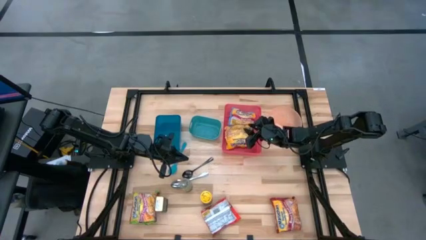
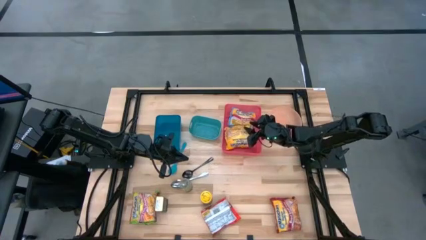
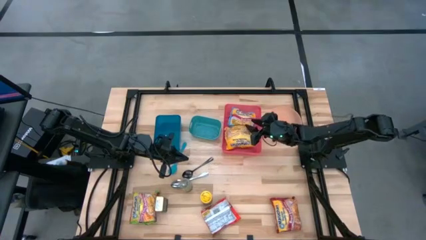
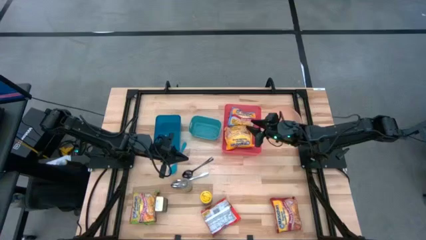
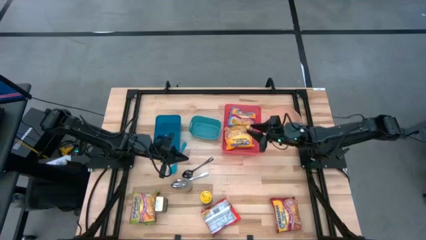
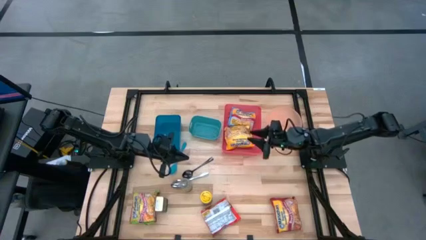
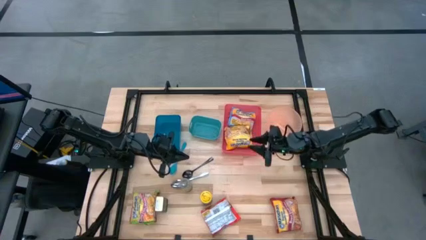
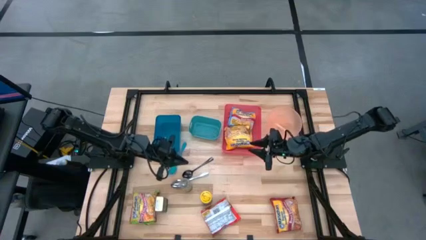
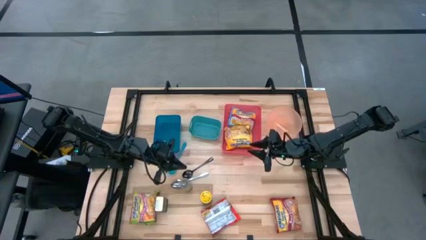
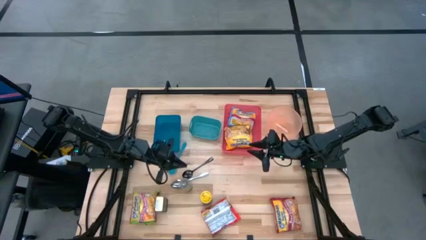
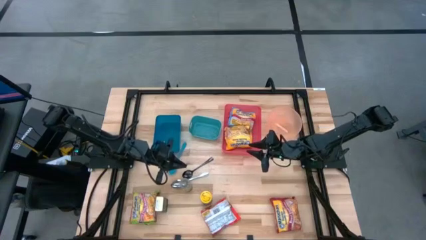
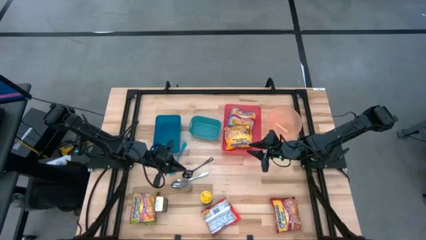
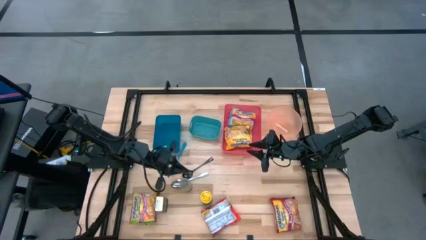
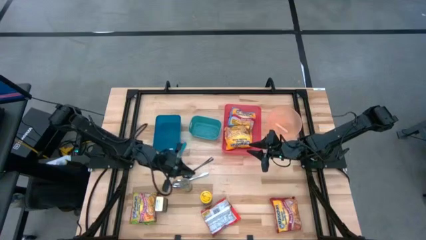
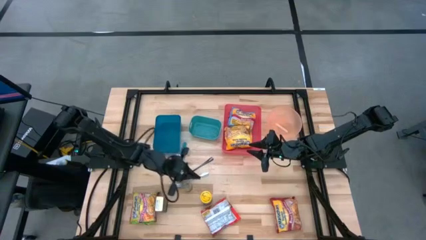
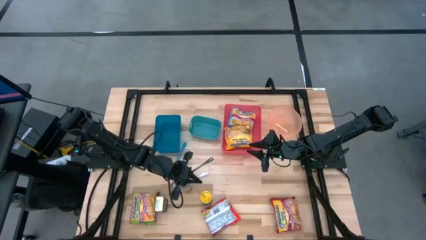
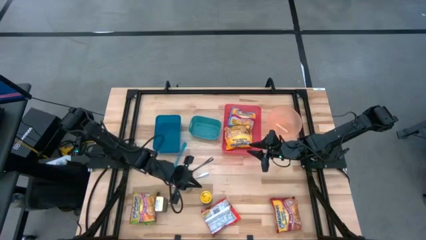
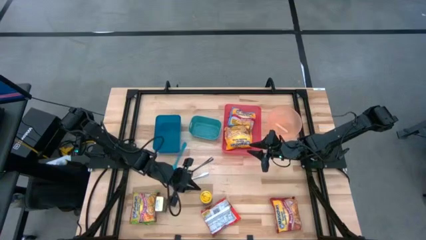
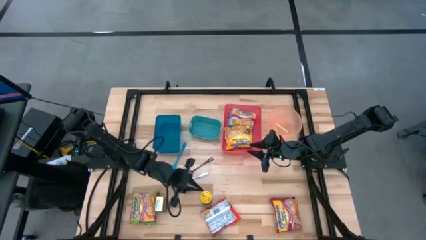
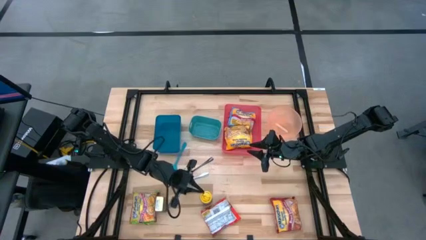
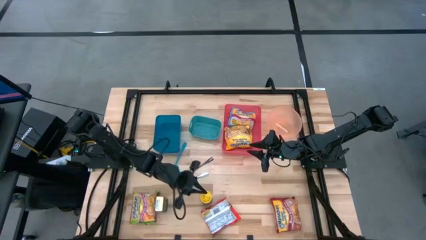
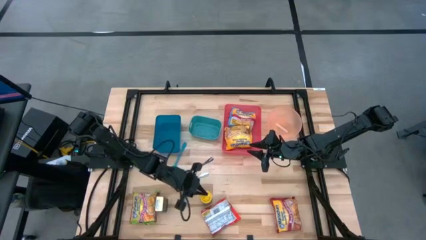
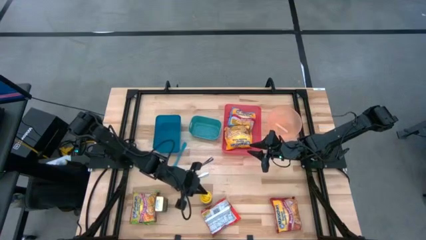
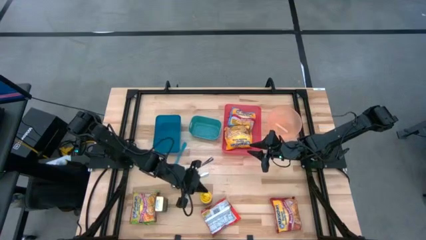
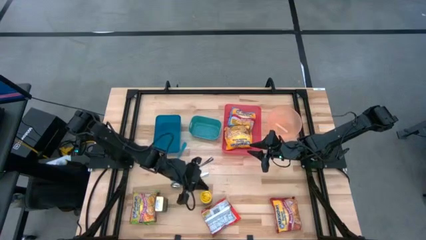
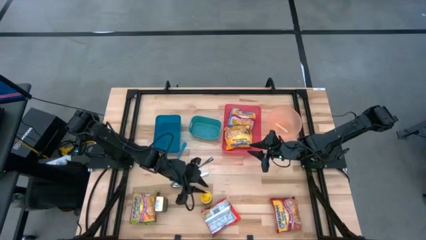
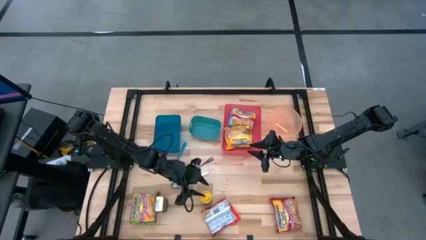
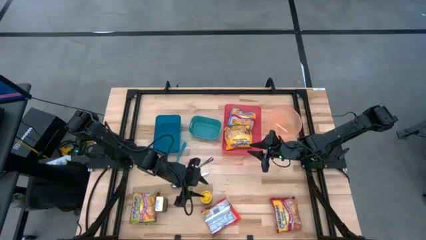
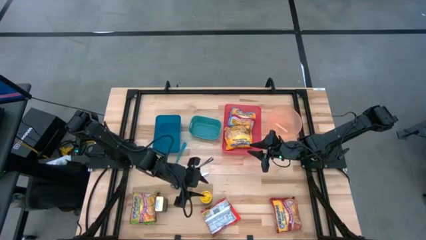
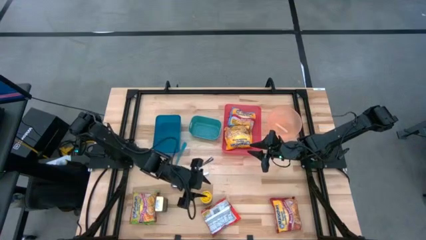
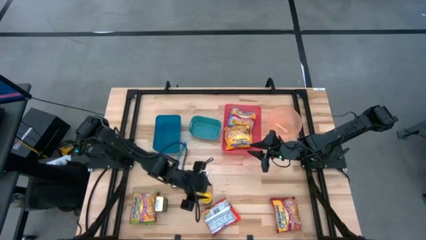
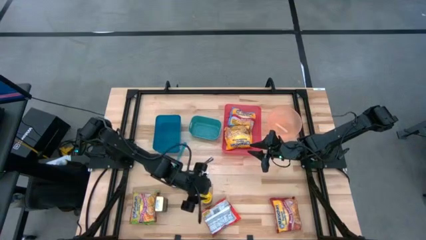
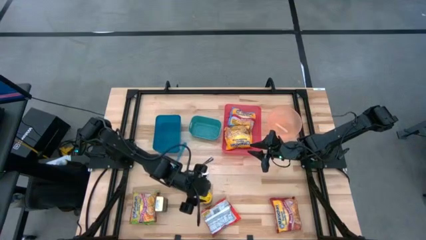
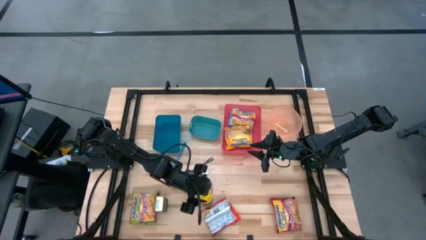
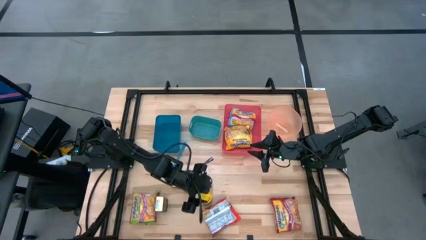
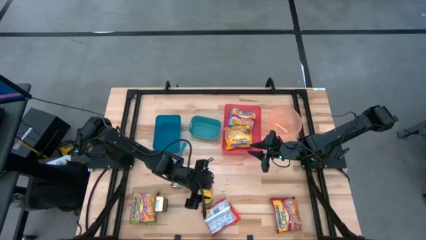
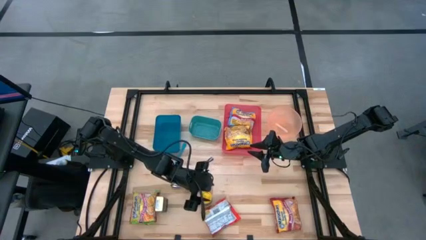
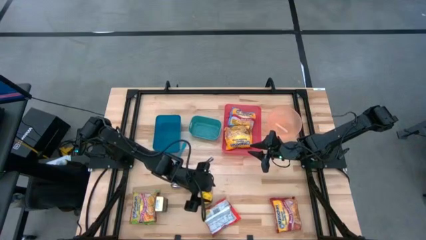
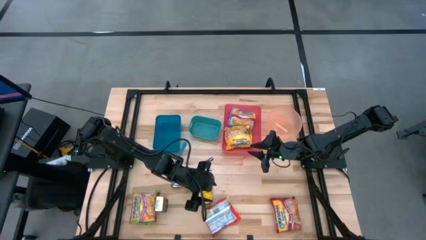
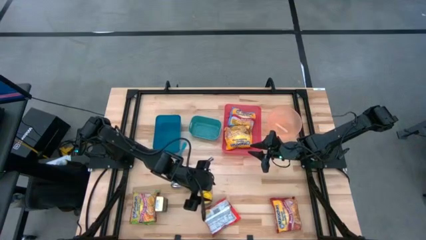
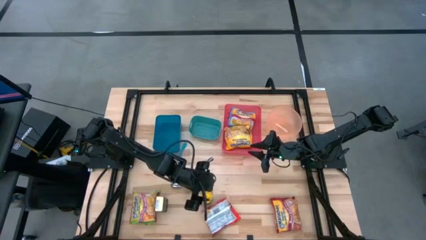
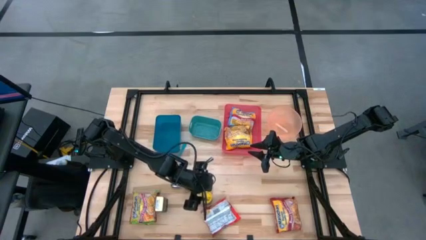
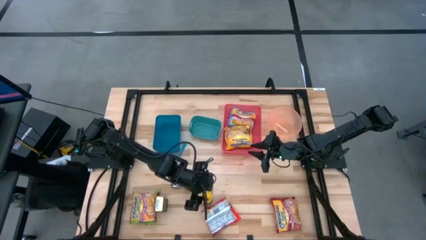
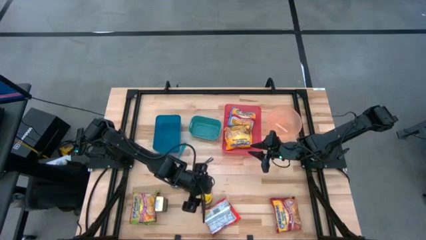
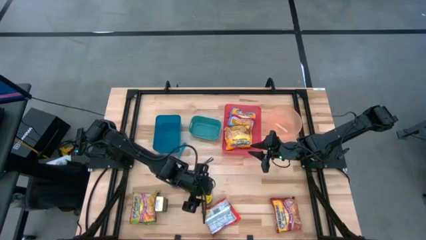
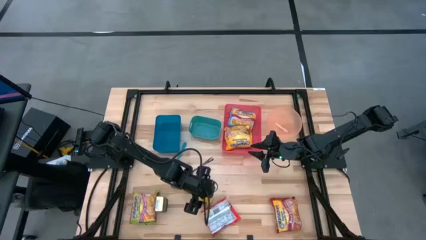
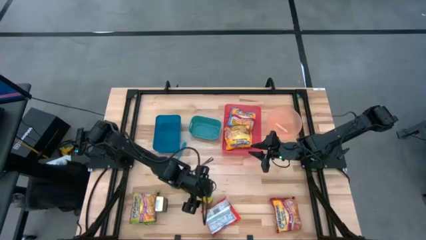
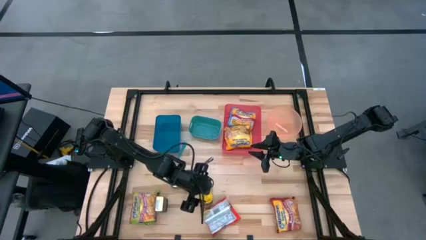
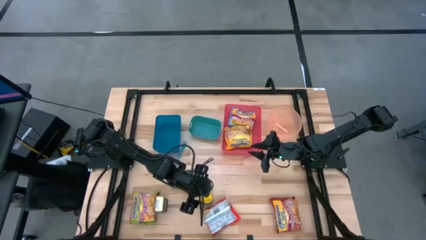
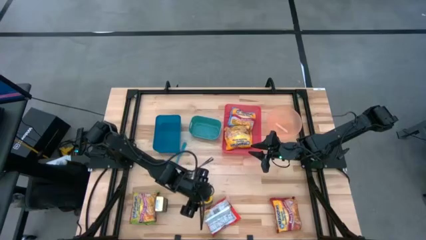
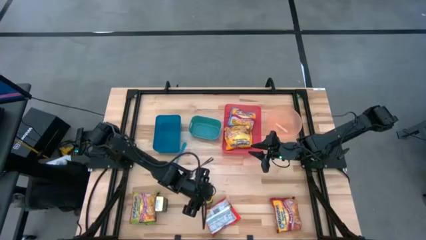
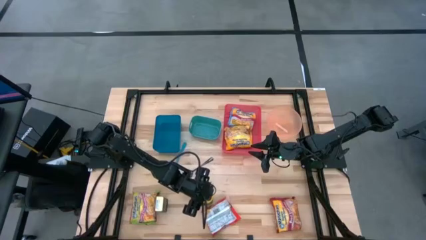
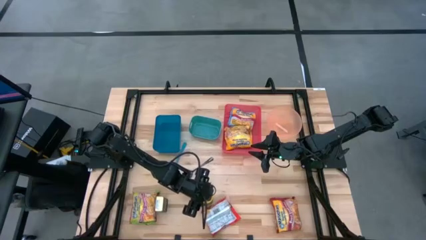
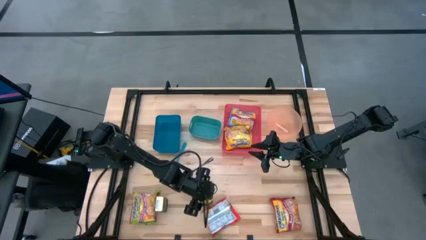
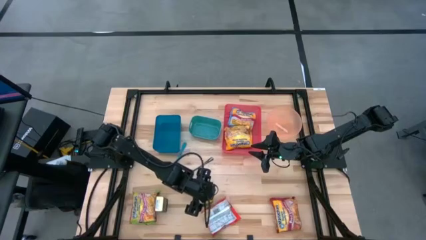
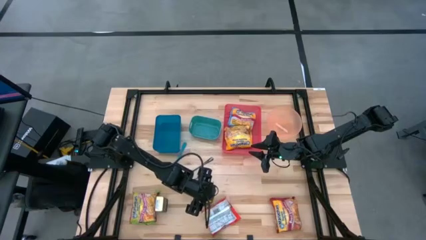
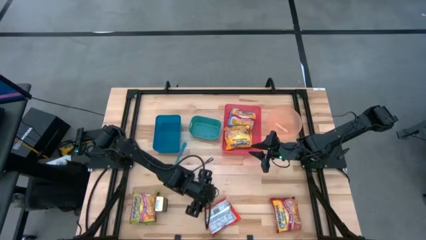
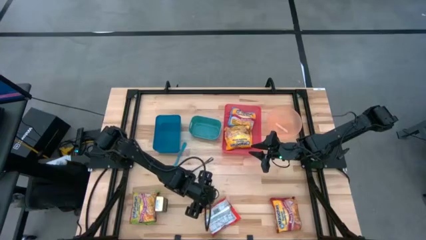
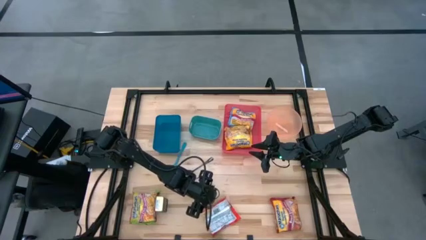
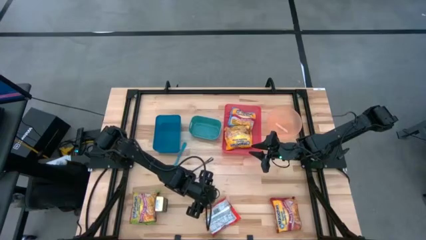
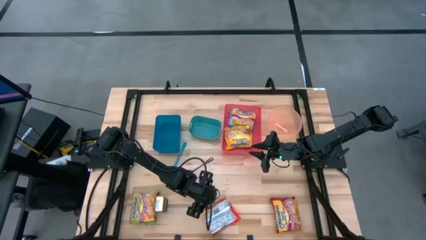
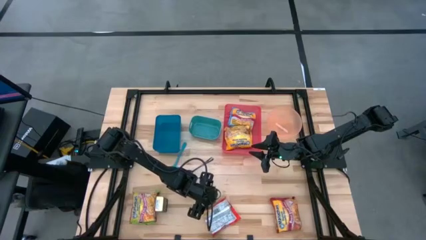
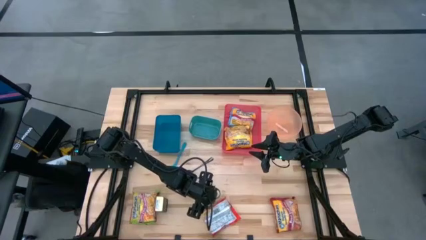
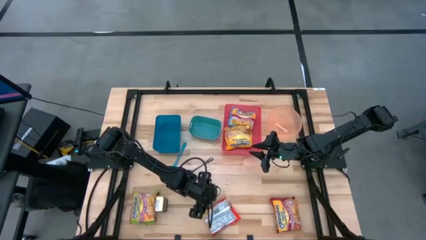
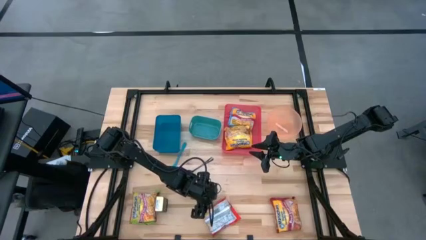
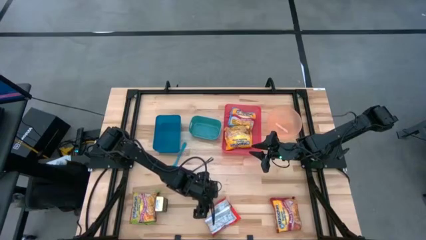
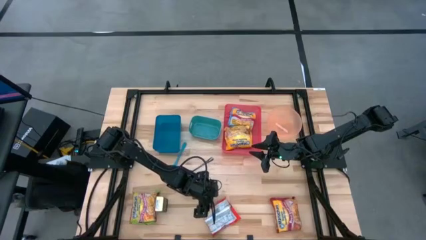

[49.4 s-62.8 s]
Task: Pick & Place Food Item
Put the yellow seasoning bottle into the blue bin

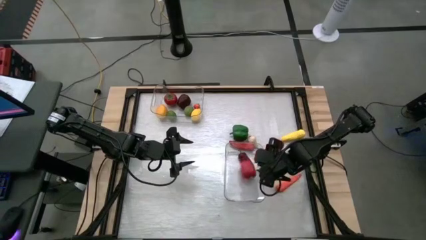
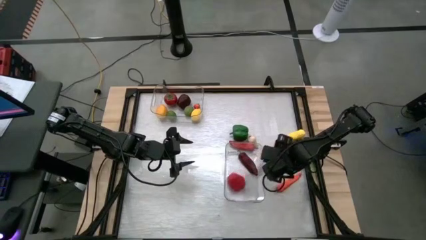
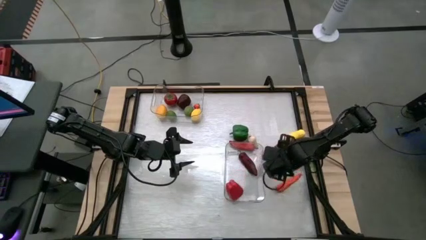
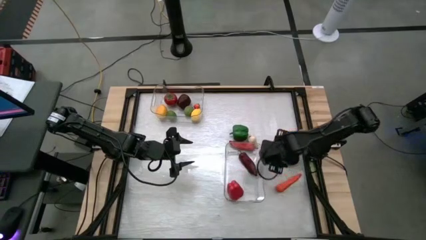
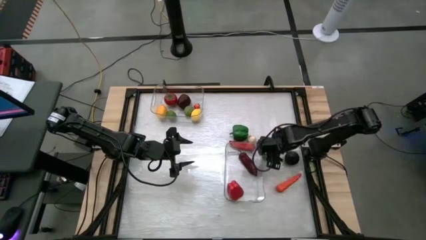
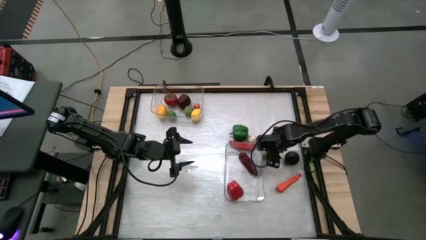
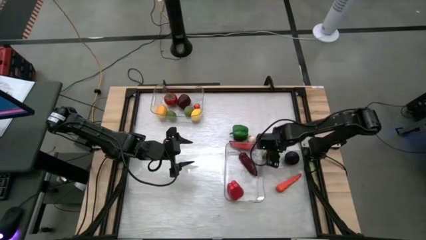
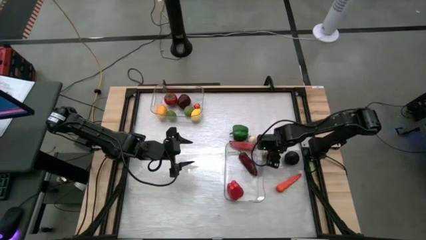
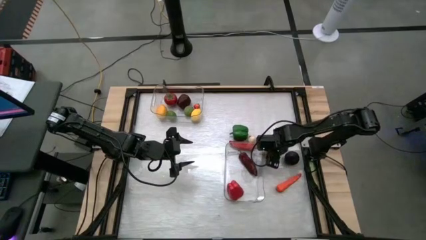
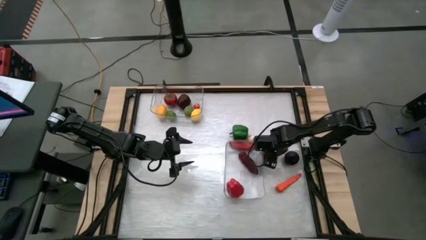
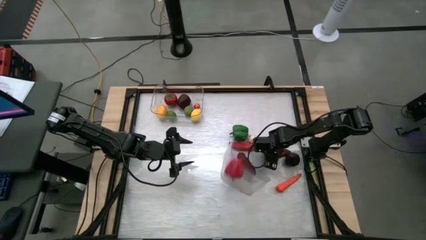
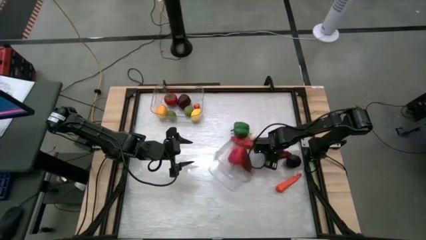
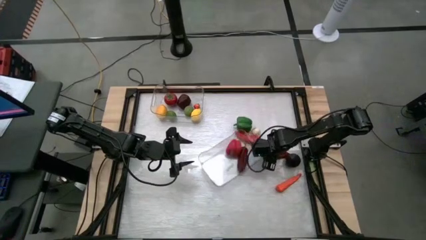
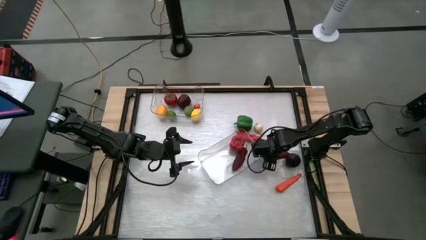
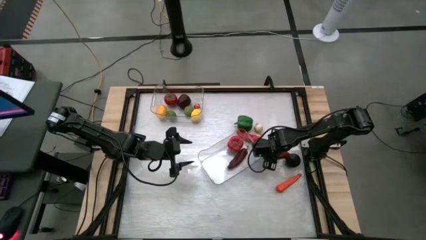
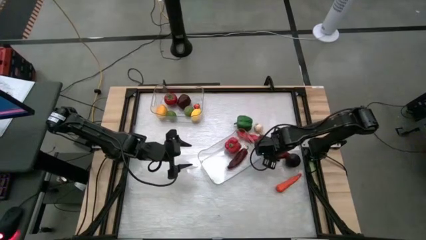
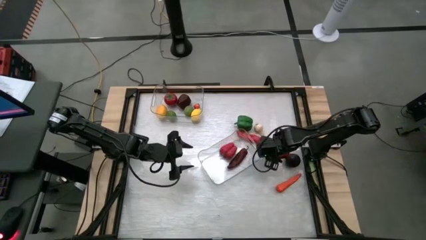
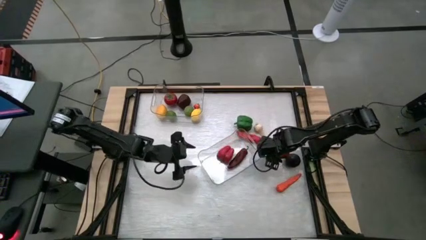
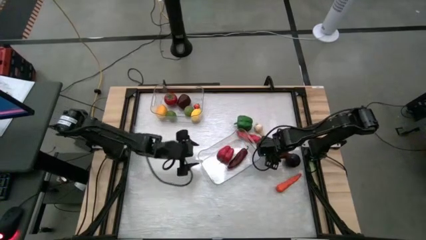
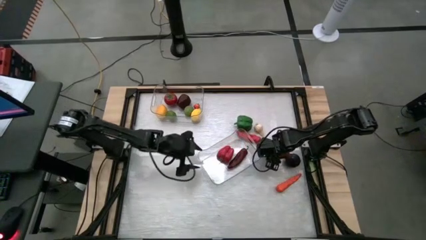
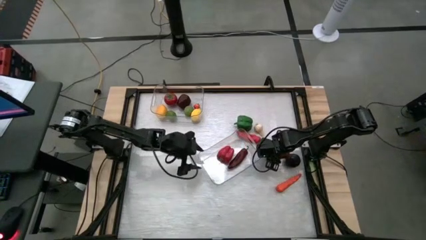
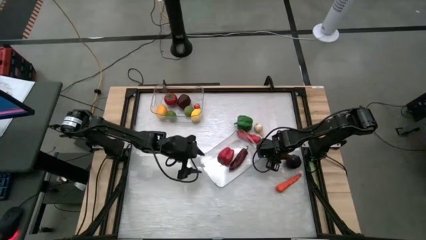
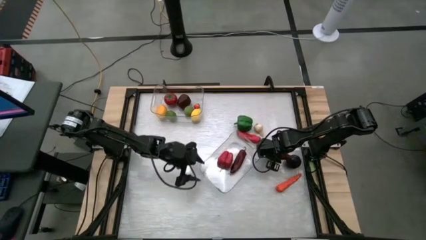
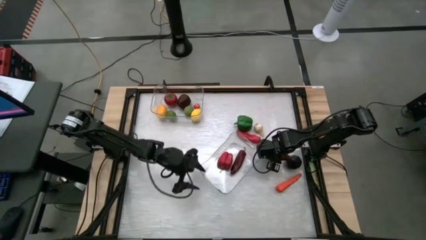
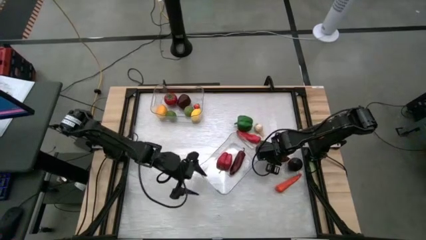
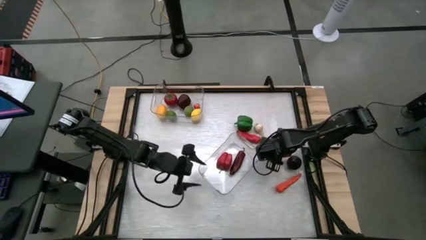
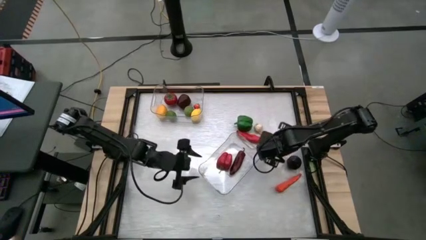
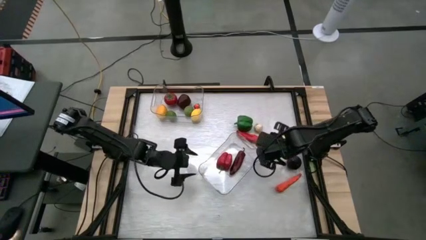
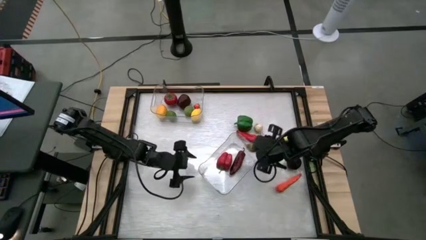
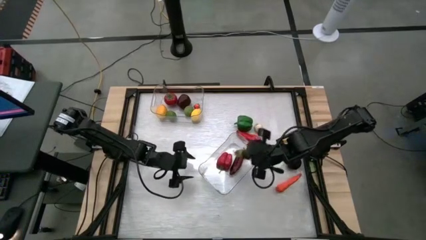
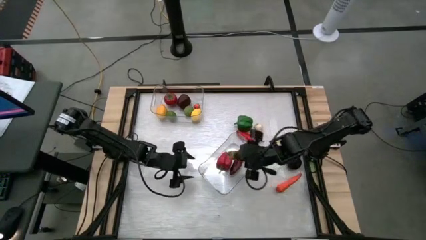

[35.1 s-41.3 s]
Task: Sort produce into baskets
Put the right red chili pepper into the bottom transparent bin
